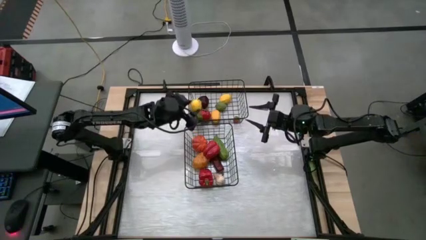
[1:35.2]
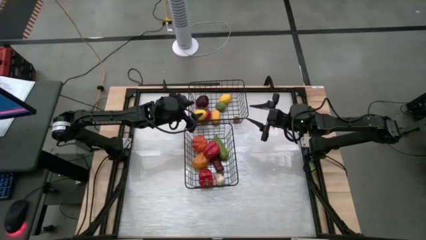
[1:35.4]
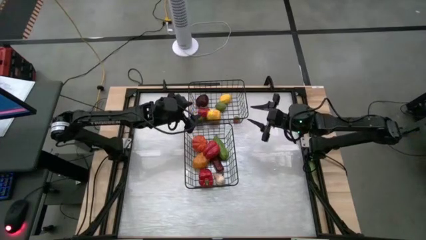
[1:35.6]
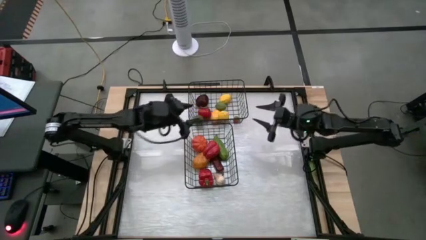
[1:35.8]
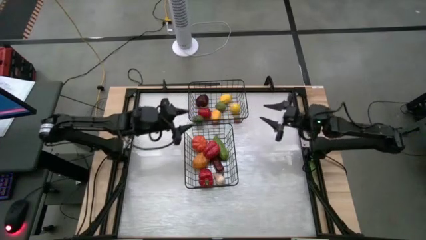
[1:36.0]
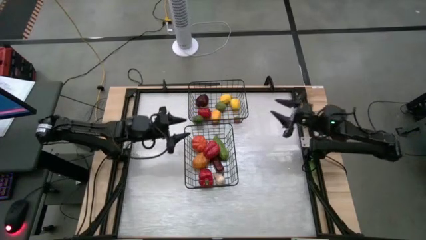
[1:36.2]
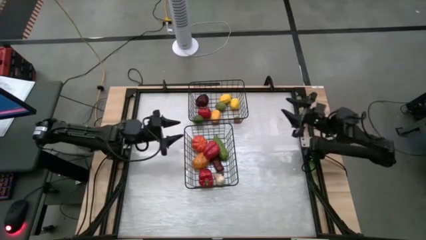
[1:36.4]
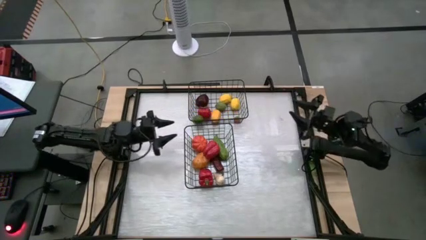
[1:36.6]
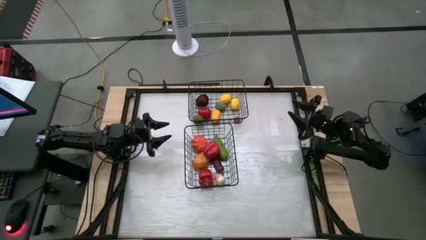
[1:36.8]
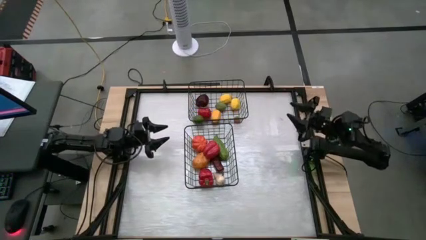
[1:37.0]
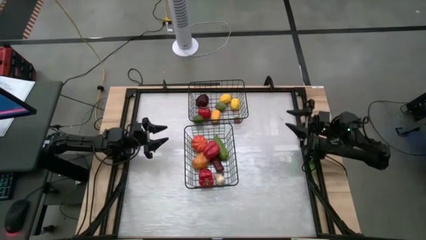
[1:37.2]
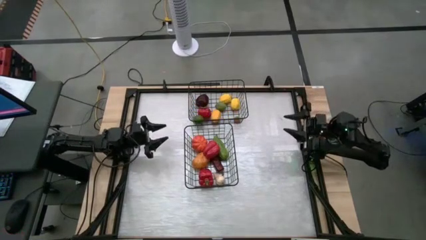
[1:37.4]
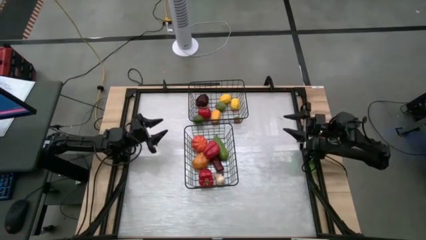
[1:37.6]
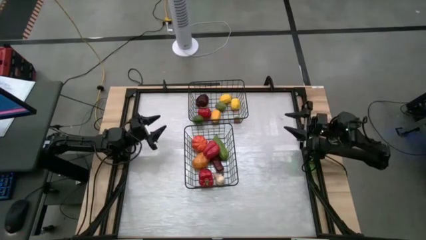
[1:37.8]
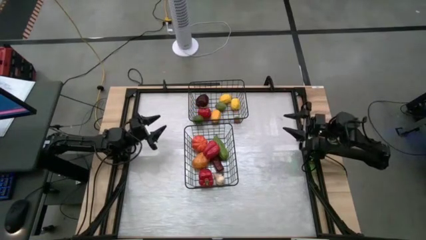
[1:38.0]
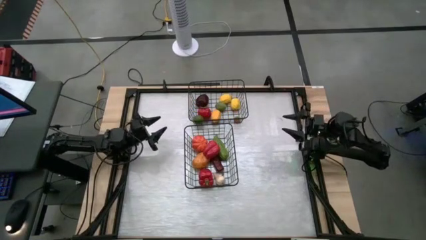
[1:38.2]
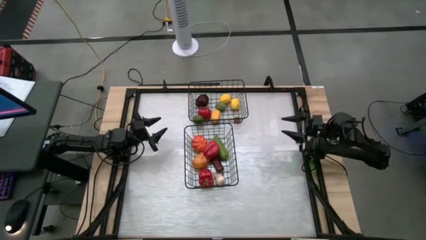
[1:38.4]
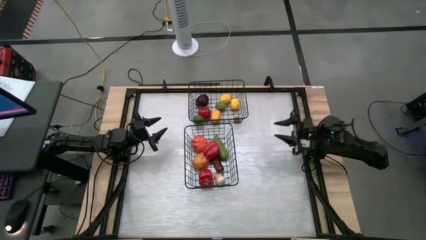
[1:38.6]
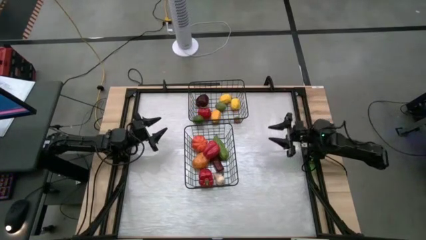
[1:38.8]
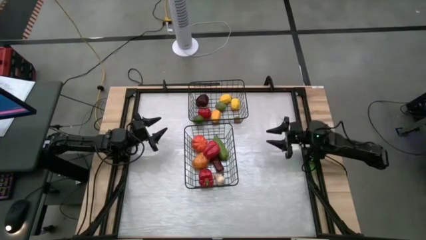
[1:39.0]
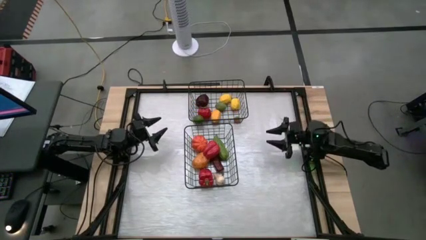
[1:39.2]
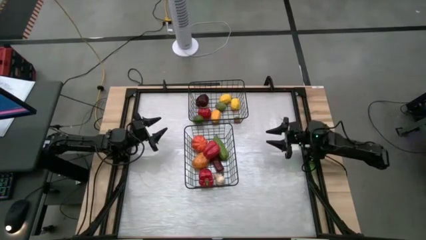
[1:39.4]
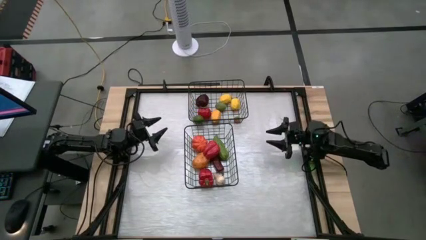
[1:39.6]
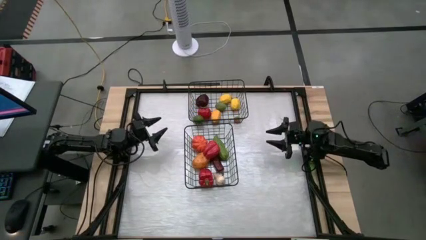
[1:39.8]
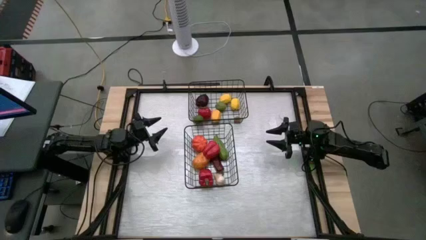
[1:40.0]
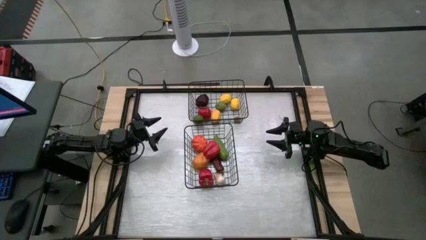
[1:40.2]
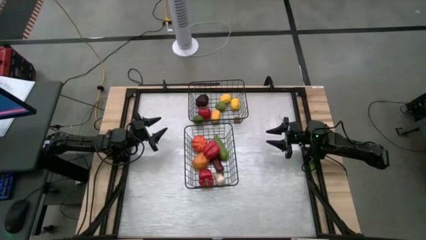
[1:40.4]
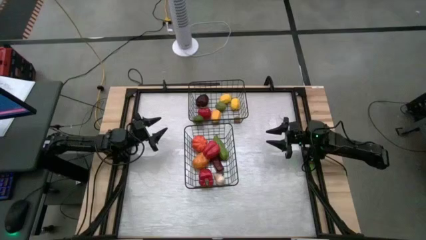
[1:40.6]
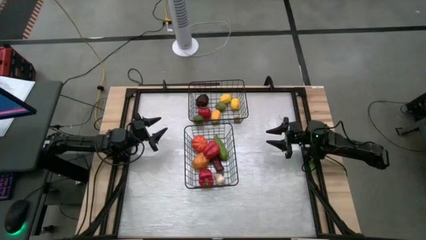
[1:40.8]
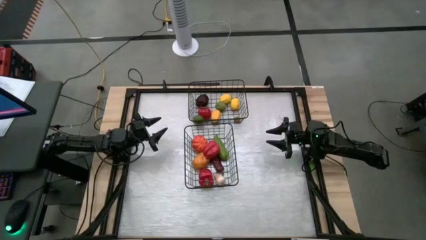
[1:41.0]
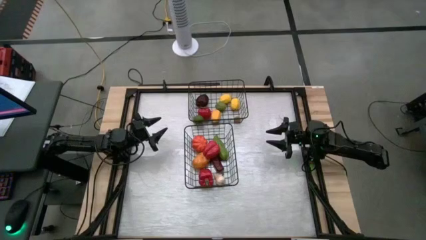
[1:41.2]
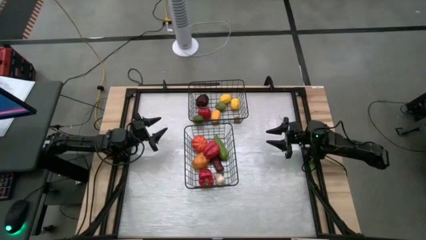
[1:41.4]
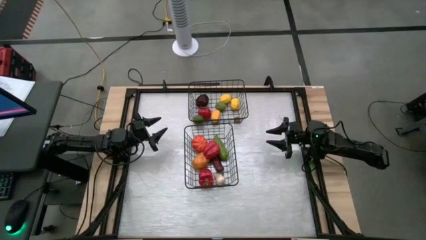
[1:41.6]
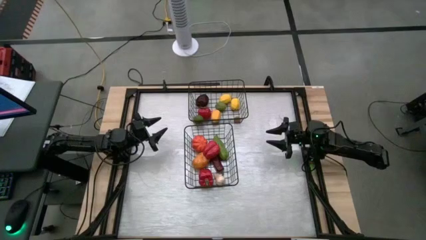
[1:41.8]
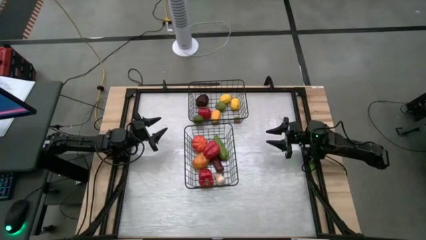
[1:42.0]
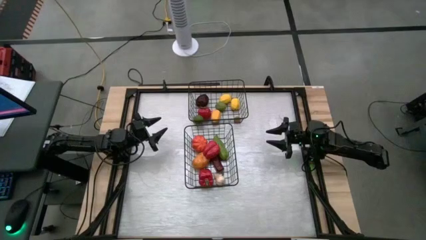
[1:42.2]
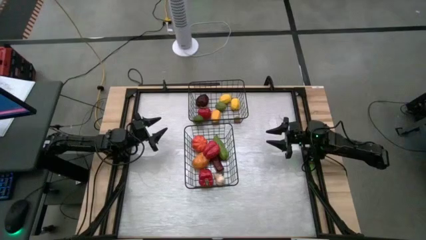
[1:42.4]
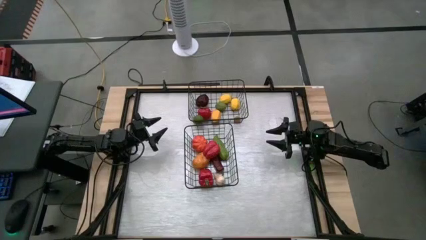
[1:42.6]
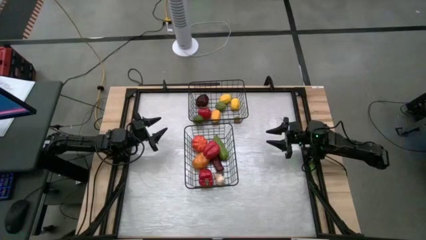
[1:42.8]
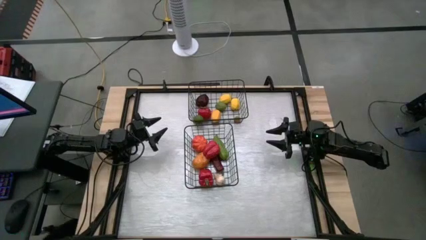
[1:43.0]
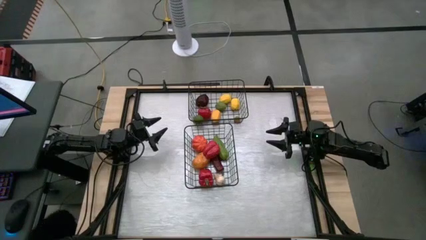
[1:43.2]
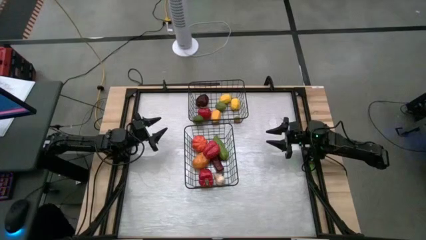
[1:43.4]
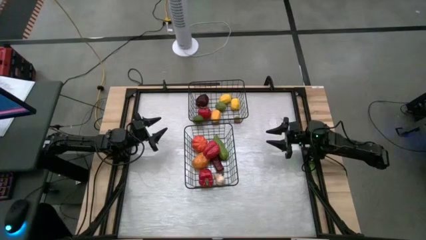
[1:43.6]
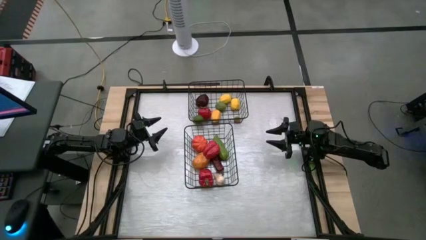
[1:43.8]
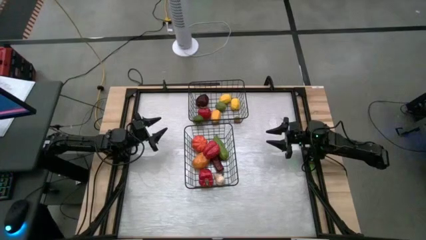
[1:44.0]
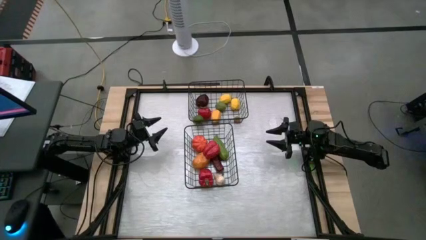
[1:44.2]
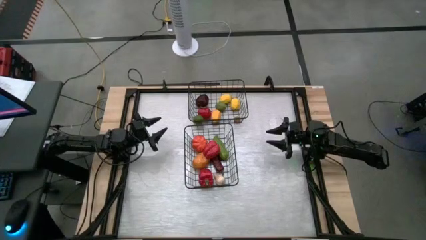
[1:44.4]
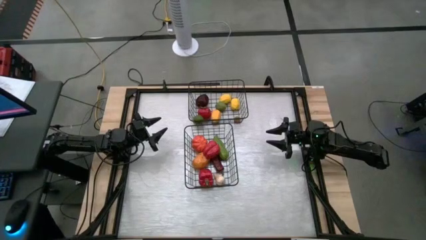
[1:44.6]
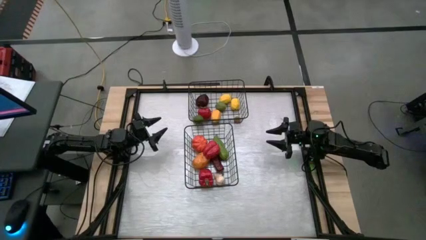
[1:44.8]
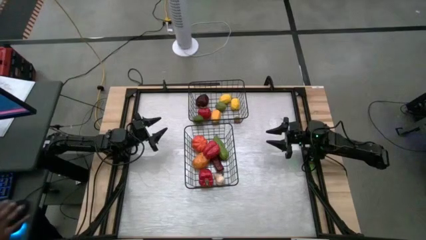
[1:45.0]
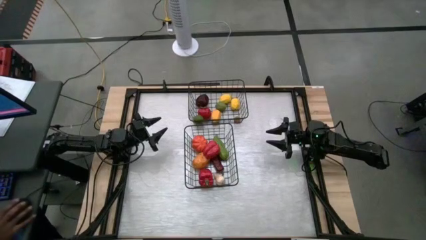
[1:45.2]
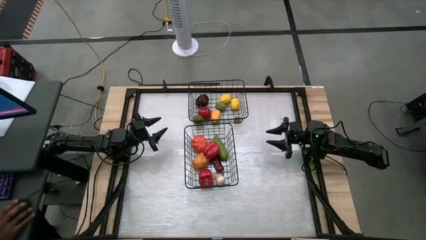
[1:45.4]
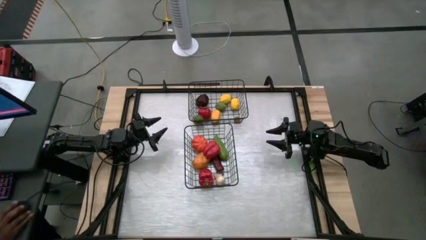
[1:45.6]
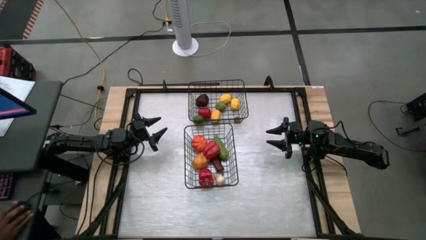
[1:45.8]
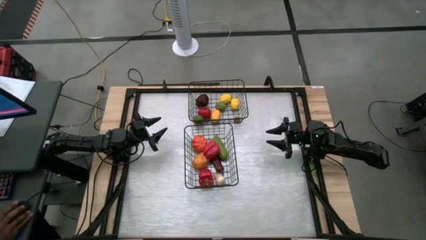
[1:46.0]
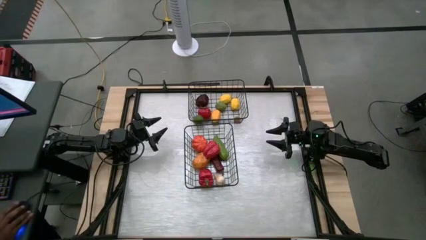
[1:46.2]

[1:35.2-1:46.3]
Task: Sort produce into baskets
Return to Home Position

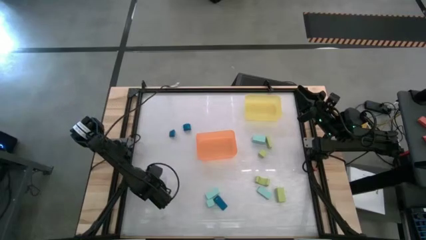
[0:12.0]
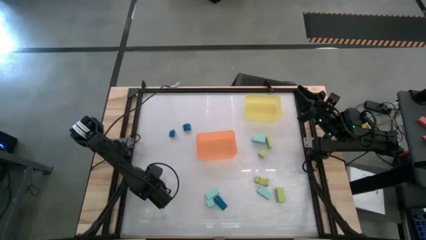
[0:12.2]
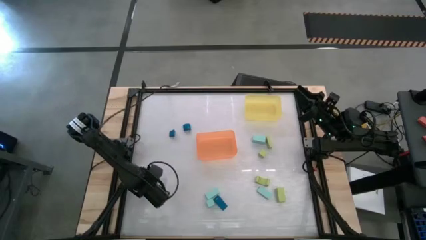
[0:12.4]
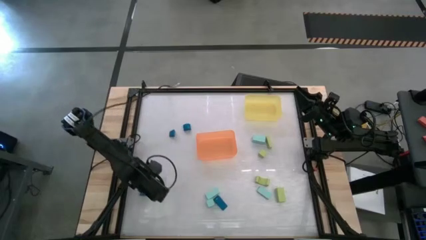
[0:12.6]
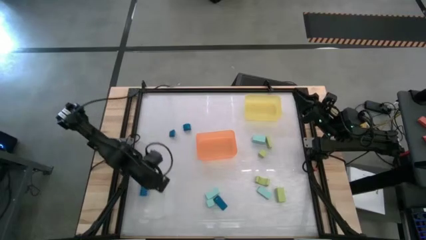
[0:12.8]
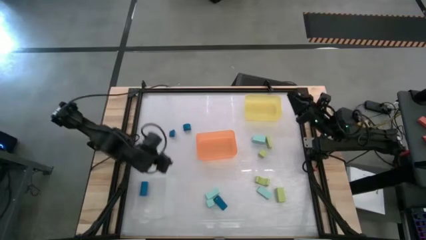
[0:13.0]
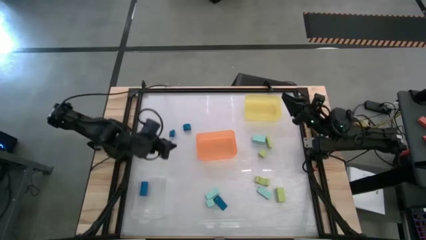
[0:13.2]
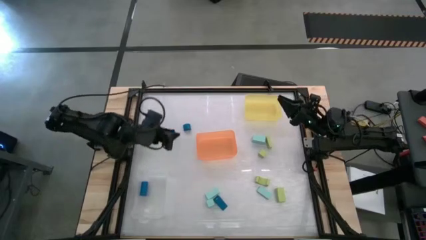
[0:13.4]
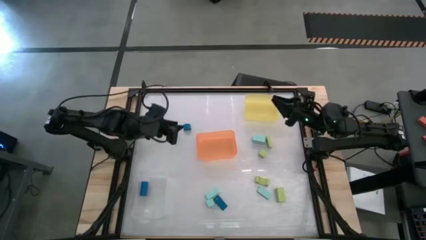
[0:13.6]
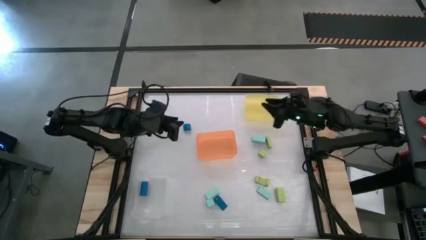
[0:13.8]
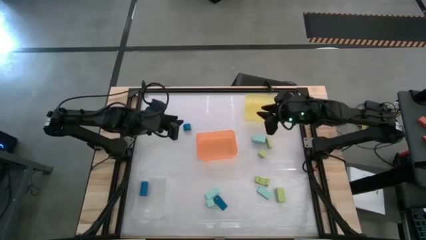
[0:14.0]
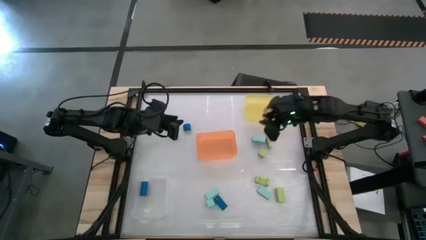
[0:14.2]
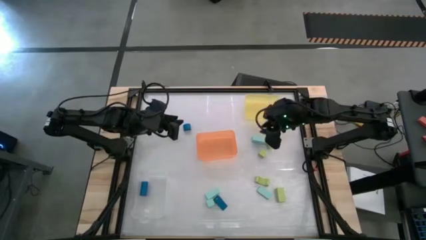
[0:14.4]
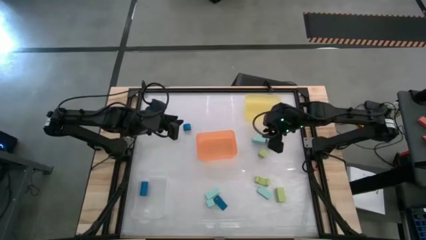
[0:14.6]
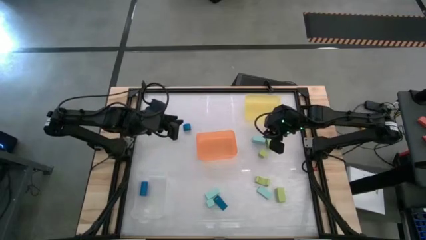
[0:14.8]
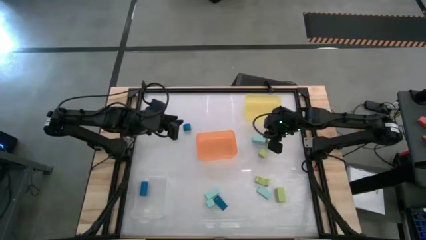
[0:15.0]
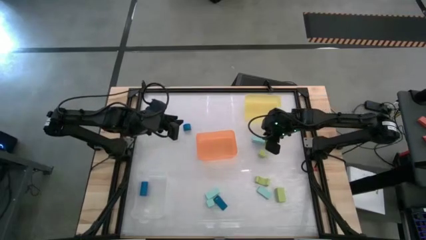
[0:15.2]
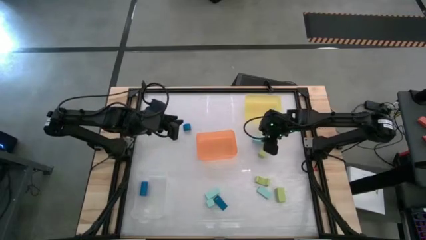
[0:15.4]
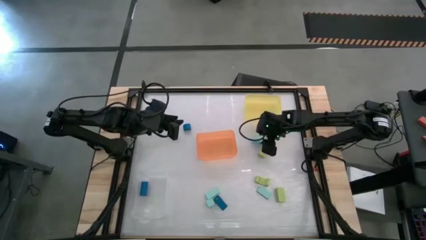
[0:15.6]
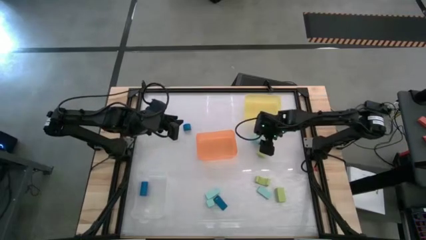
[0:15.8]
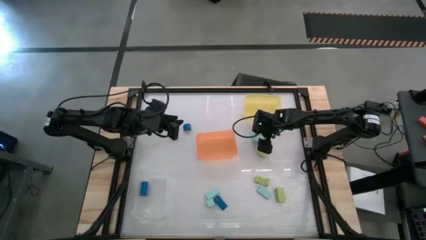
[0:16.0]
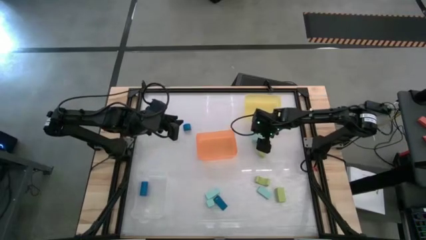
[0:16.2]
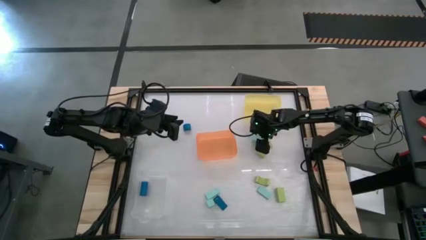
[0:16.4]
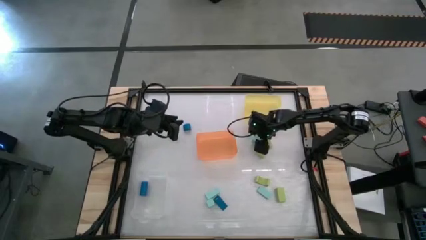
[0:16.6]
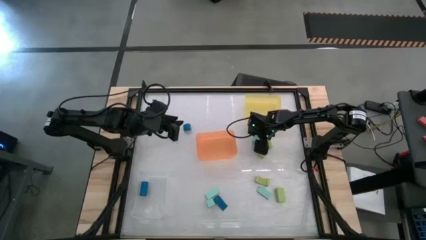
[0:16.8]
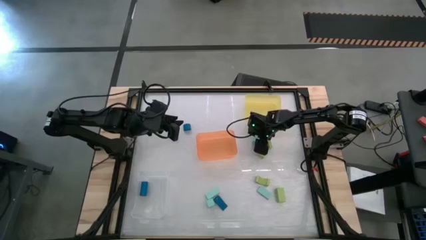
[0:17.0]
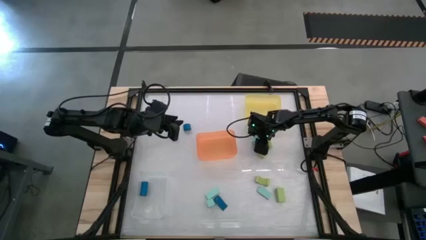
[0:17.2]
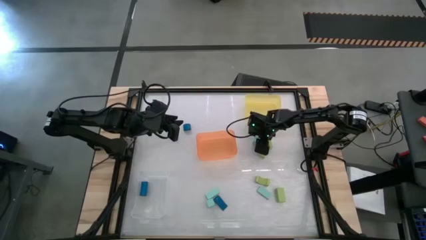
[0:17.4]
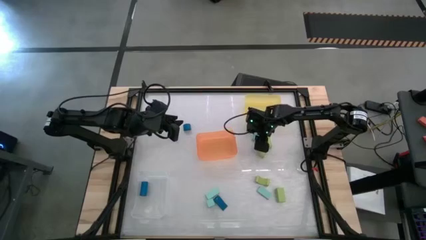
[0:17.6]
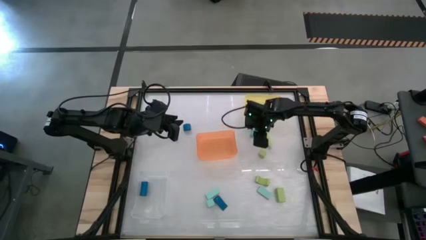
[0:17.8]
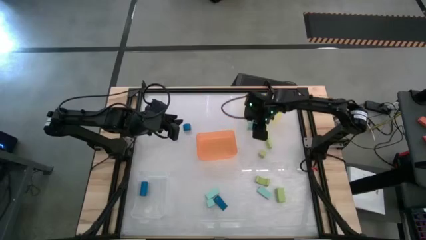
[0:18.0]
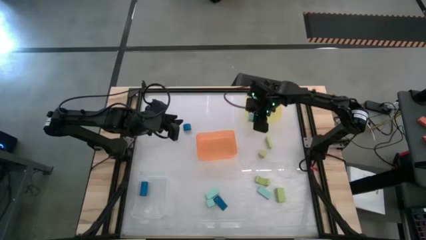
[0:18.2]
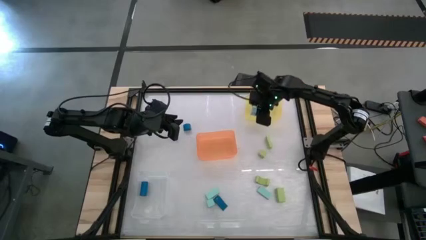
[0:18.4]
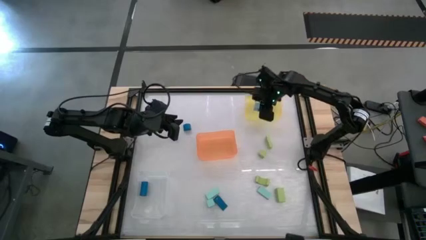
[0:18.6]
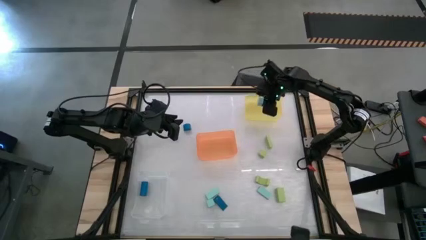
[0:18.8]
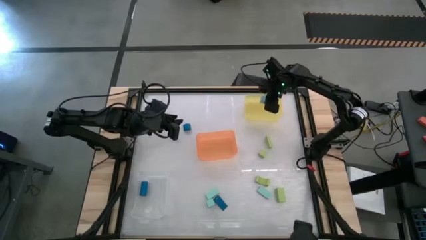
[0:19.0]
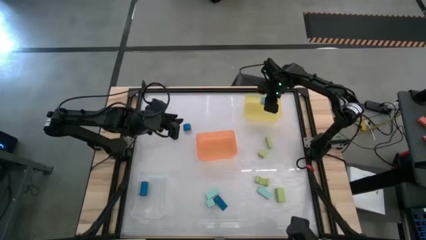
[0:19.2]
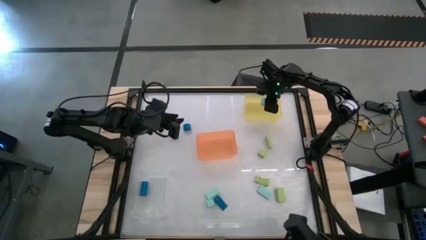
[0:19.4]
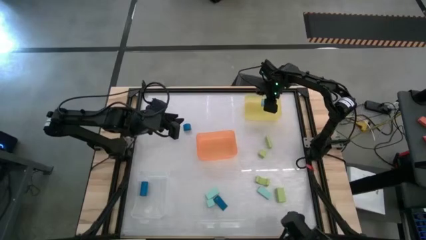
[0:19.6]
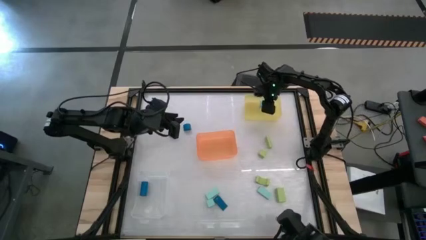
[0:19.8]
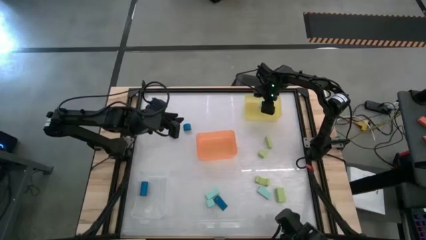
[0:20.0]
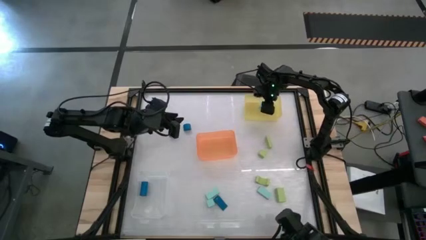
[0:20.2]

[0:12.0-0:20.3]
Task: Sort & place blocks by color
Put the light blue block into the yellow bin
